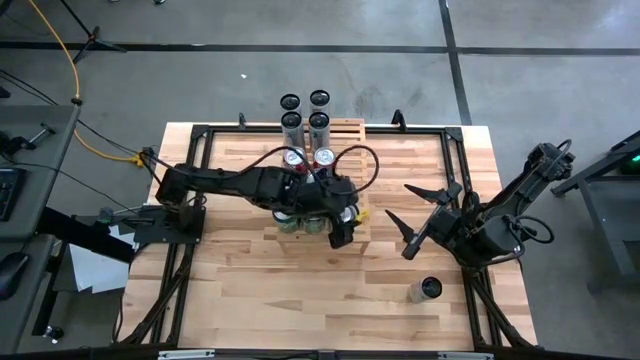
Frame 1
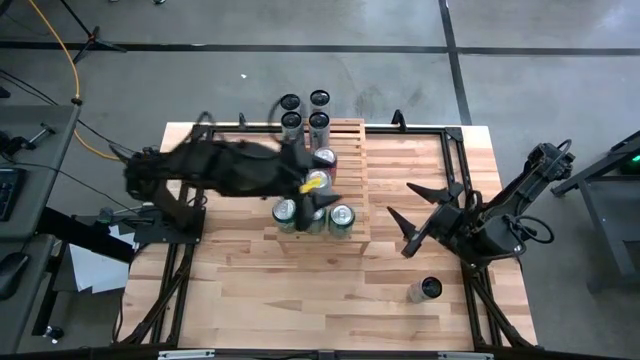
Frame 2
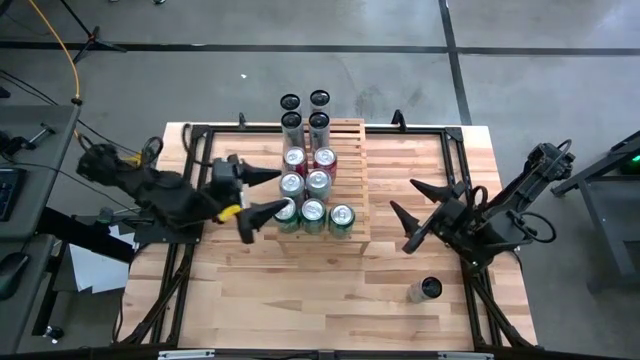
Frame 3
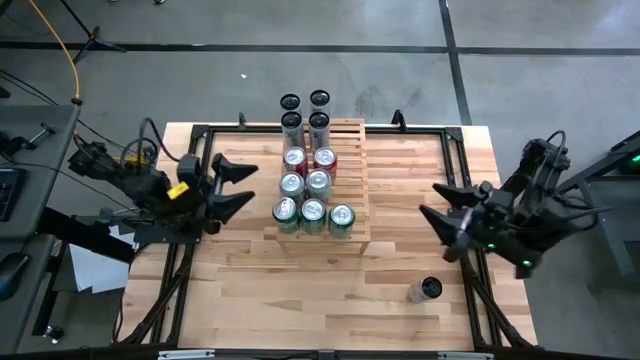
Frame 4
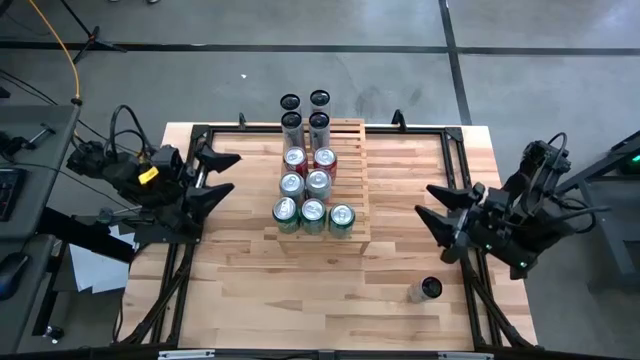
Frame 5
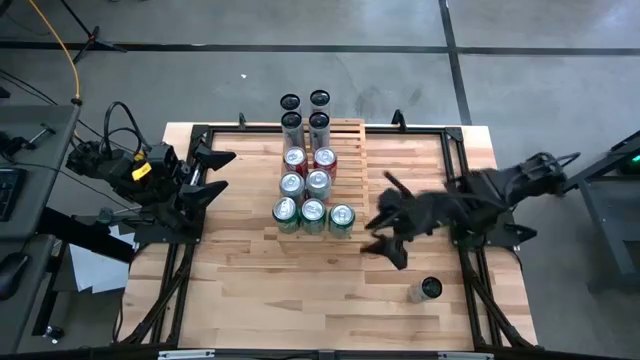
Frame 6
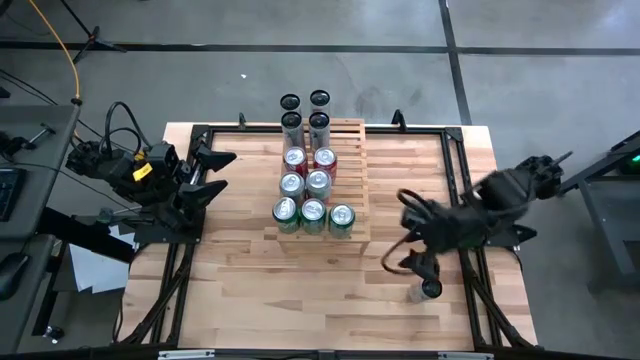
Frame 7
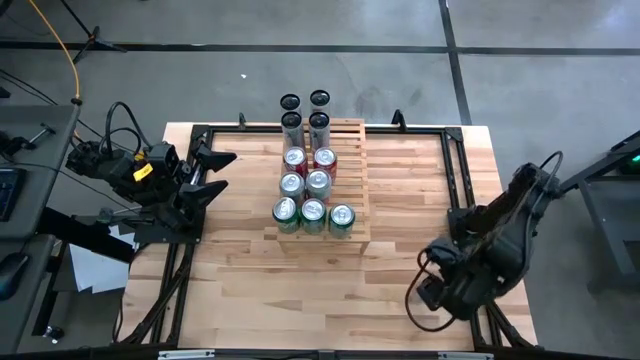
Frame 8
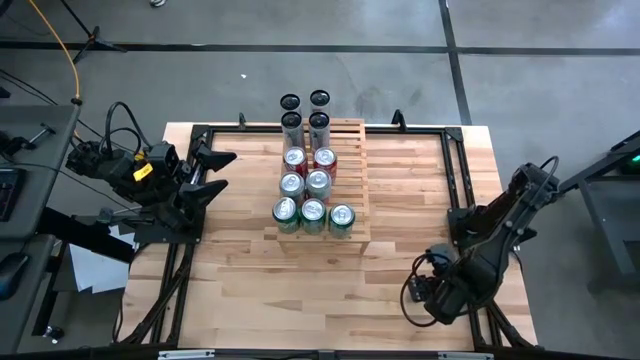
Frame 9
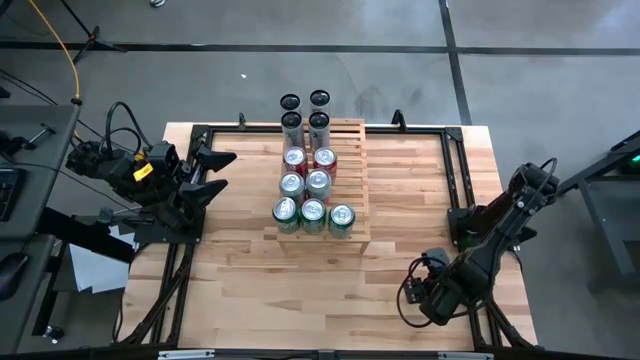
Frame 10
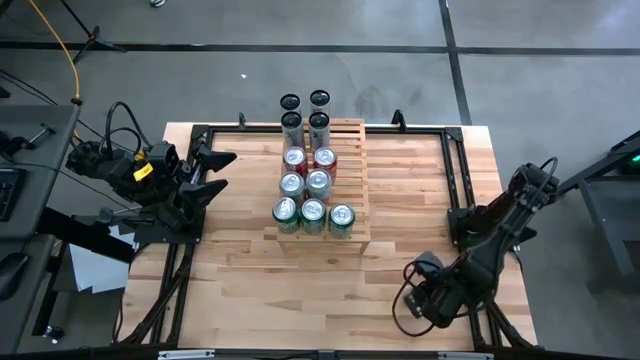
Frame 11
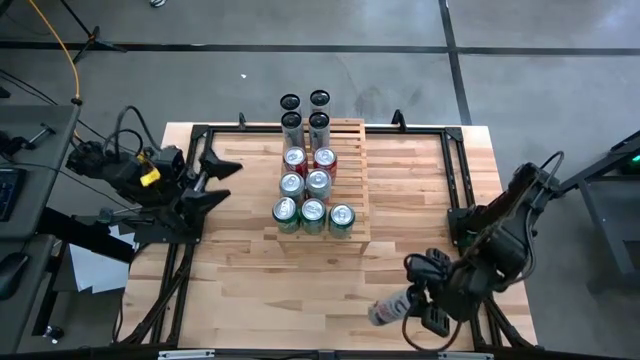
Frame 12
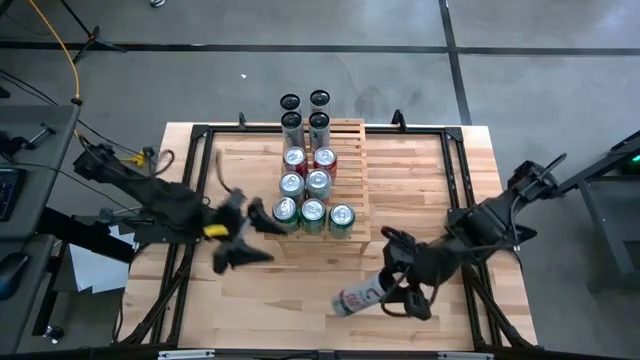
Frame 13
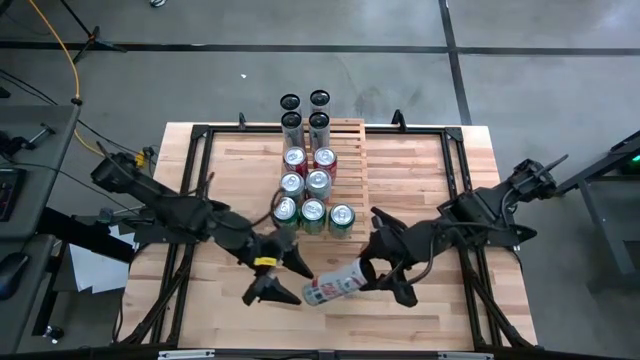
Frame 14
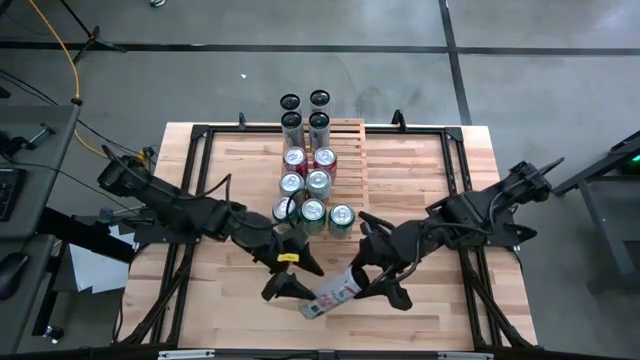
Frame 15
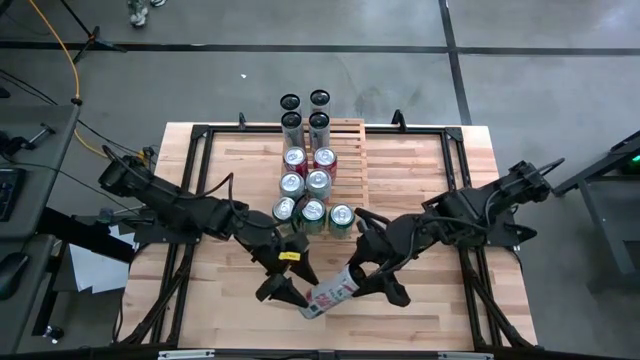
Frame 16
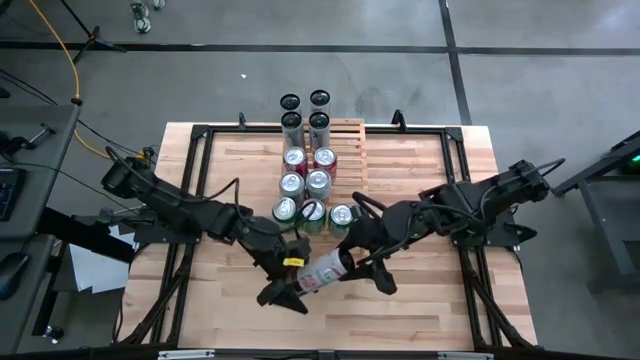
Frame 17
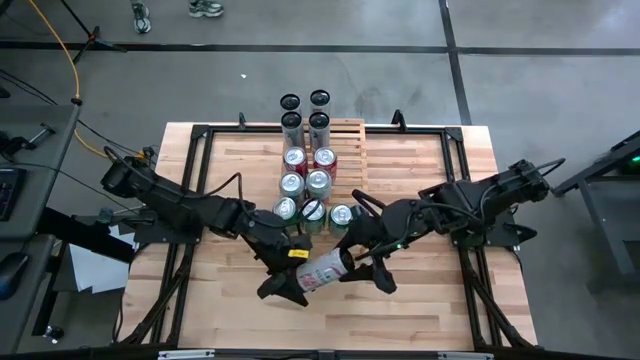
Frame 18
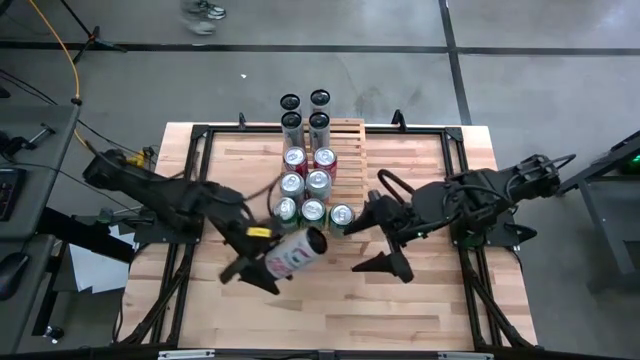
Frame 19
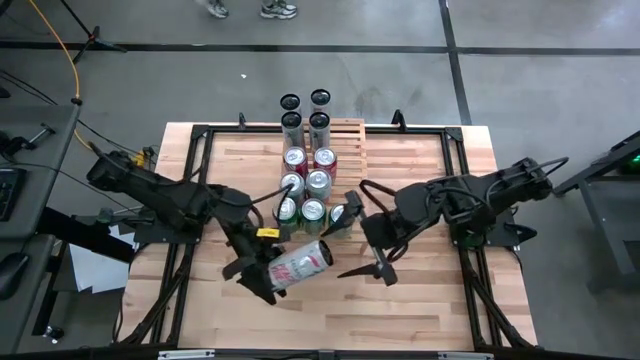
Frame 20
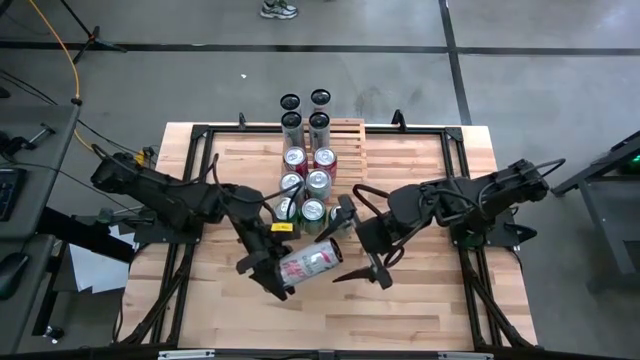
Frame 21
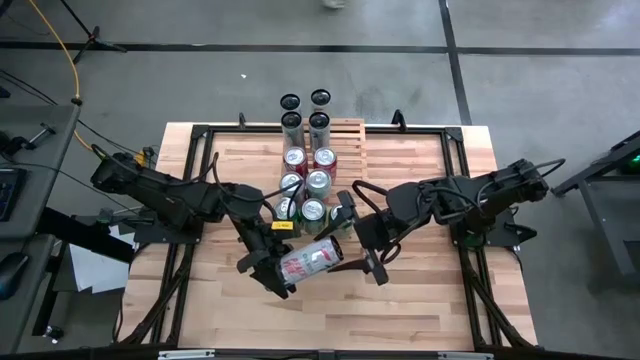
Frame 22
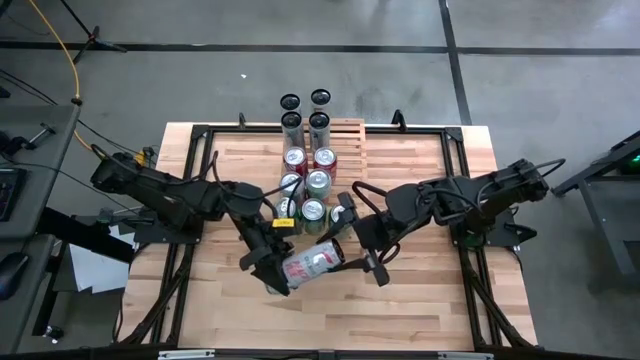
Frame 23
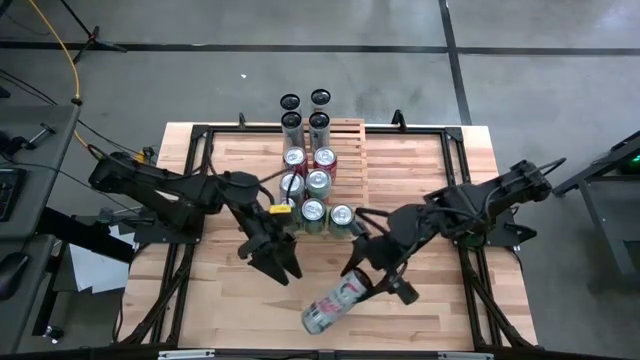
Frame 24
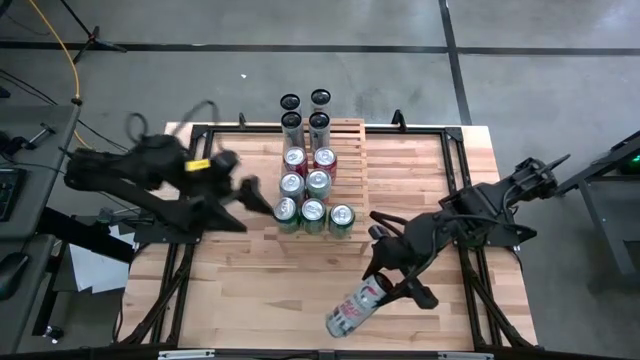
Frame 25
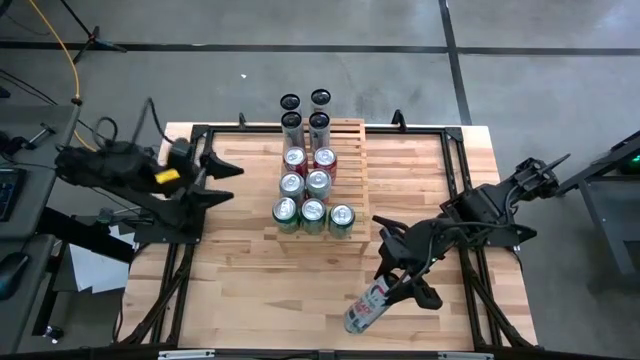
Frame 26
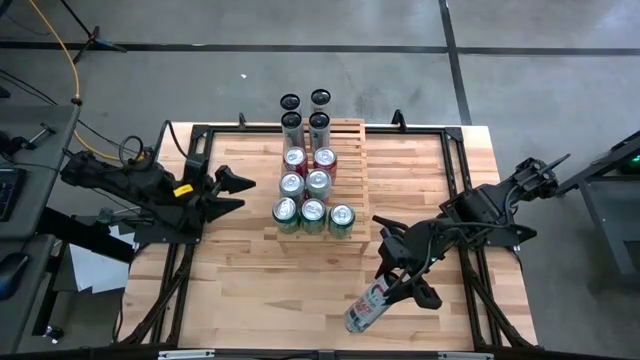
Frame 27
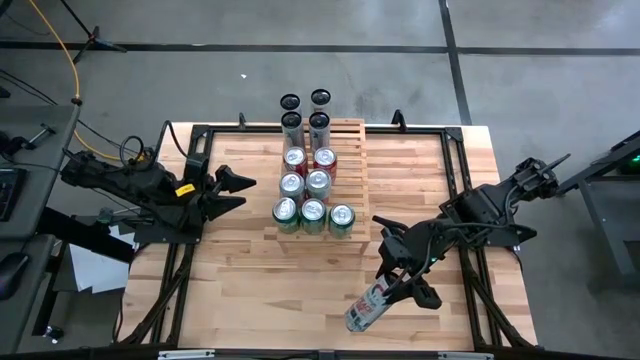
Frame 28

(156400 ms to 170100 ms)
Task: Place canned beverage on shelf
Put the white pink soda can on the shelf aligned with the other white pink soda cans

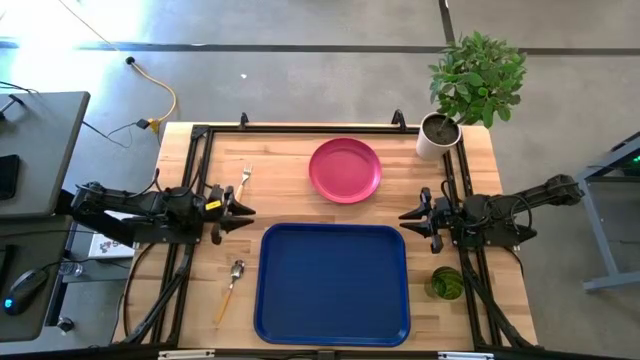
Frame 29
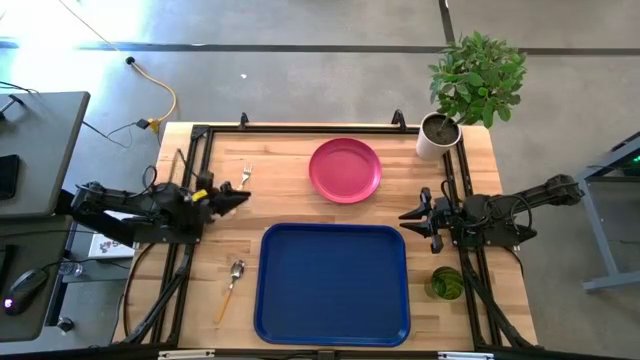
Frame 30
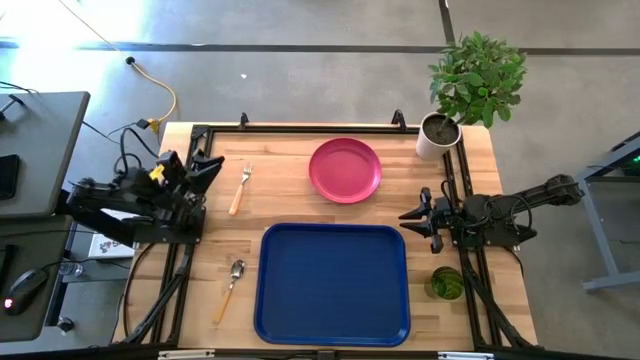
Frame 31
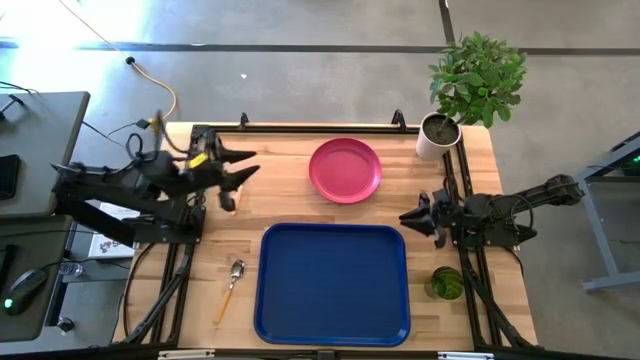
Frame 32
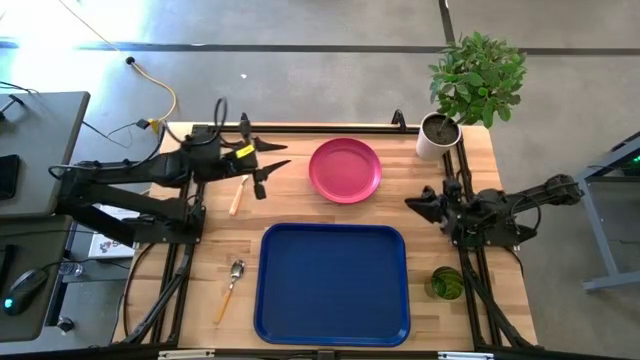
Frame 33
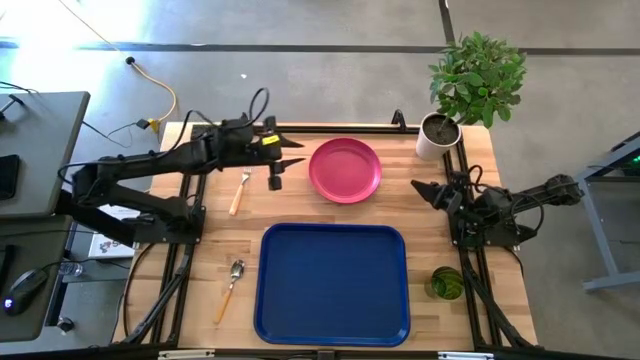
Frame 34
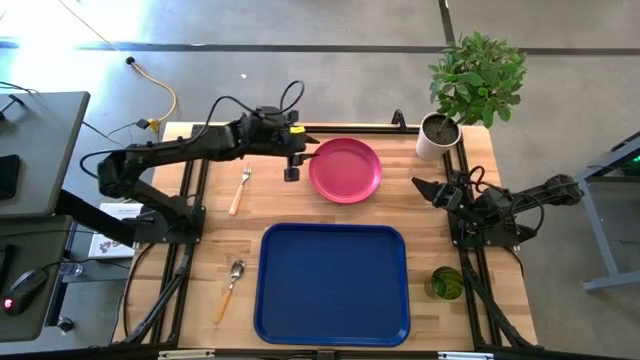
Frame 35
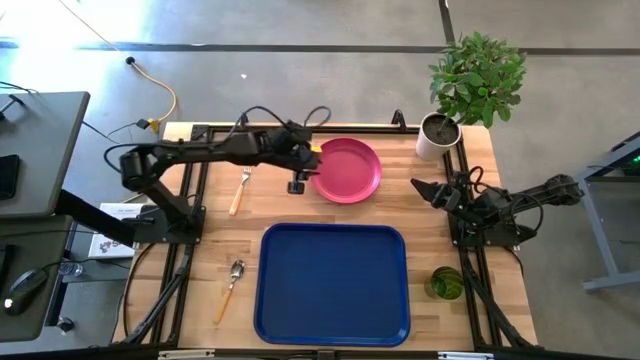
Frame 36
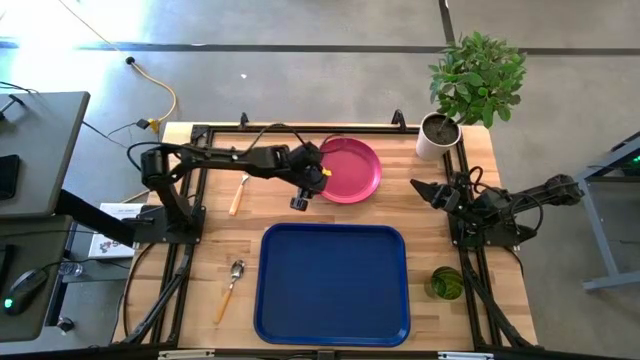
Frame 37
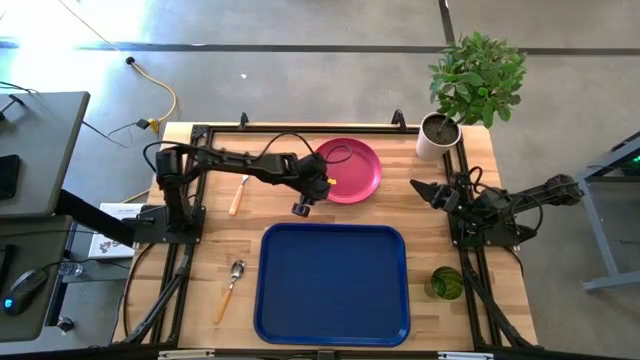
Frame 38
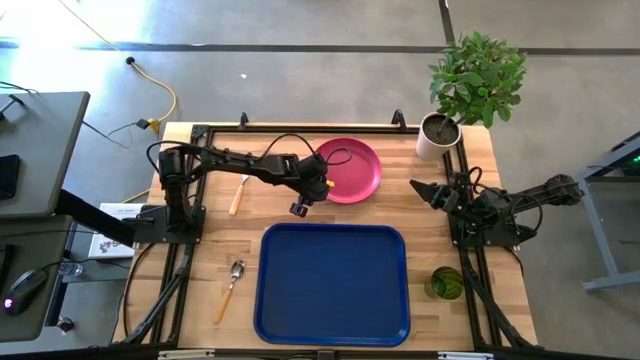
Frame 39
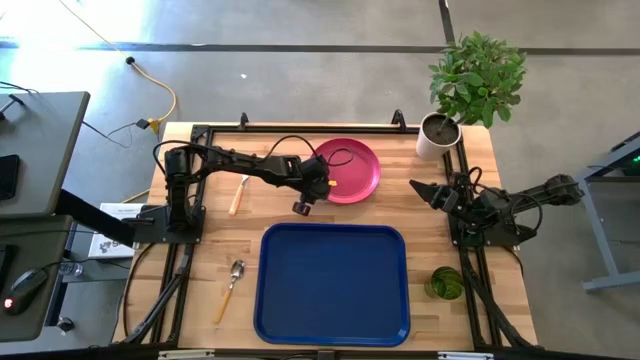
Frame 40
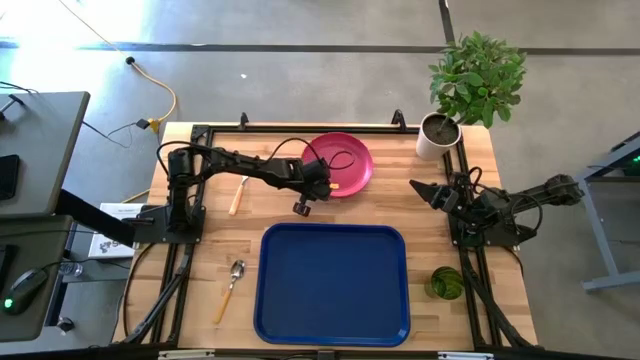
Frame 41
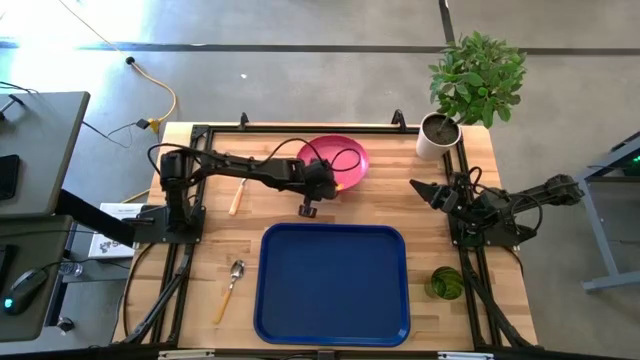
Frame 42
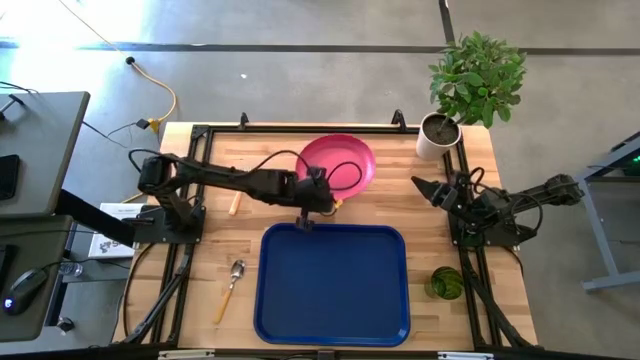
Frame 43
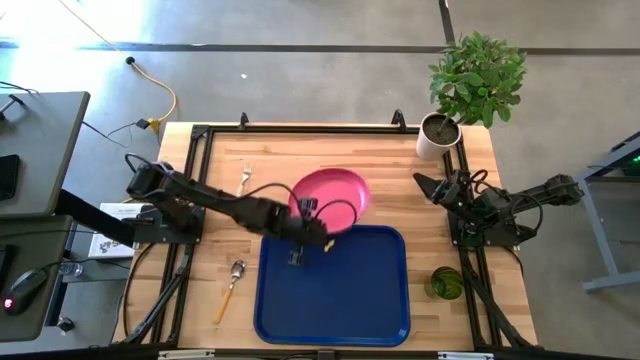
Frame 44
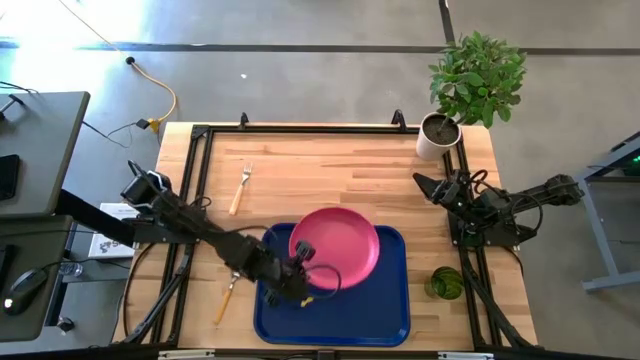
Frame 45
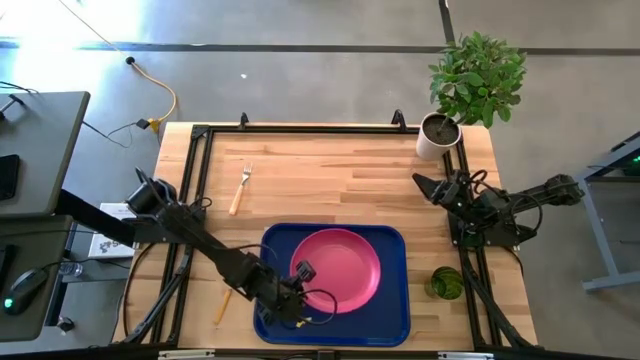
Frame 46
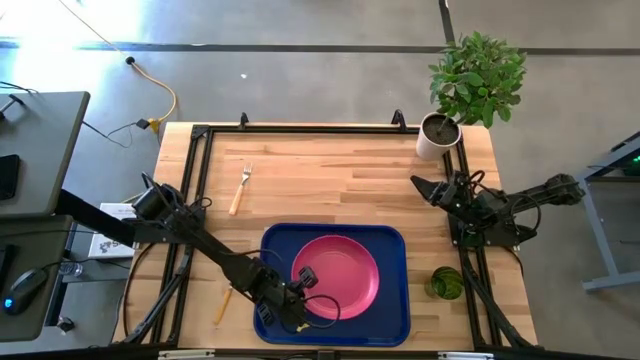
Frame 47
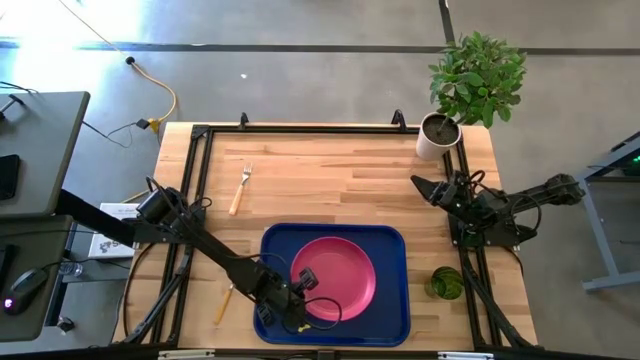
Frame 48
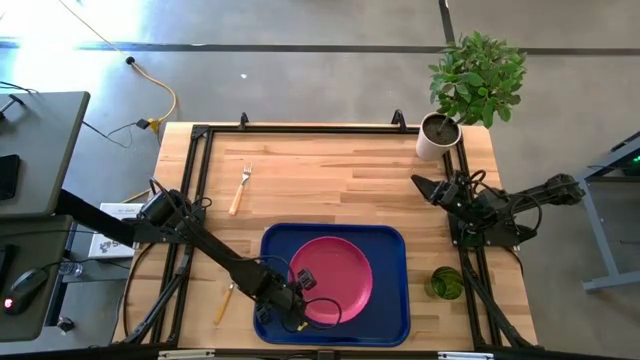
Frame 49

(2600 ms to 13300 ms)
Task: Pick and place plate/cup/fork/spoon on tray
Put the pink plate on the blue tray
